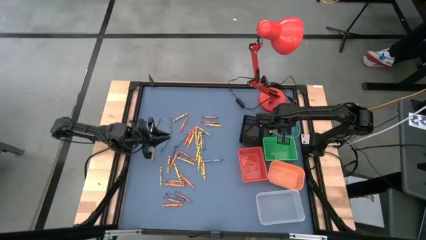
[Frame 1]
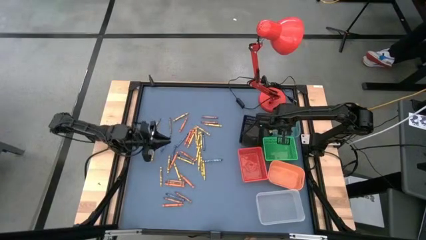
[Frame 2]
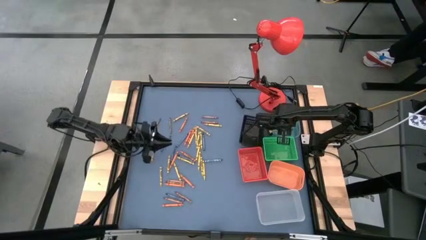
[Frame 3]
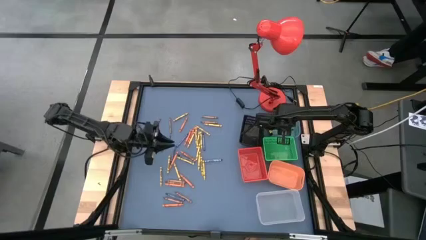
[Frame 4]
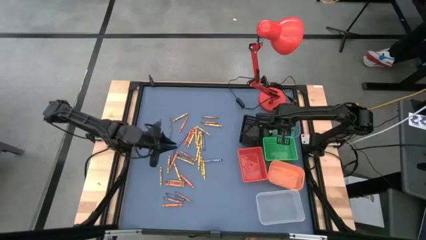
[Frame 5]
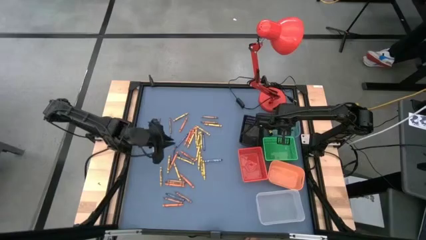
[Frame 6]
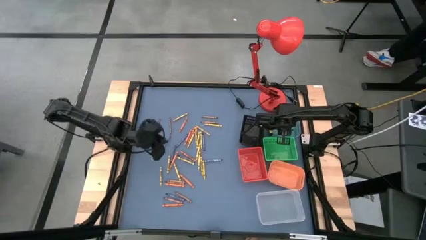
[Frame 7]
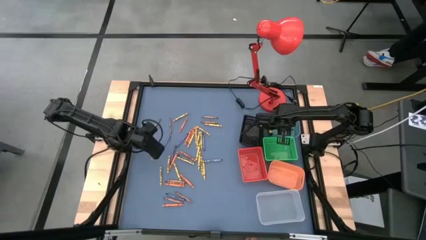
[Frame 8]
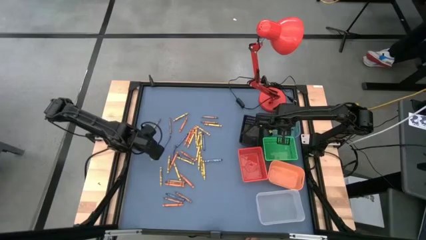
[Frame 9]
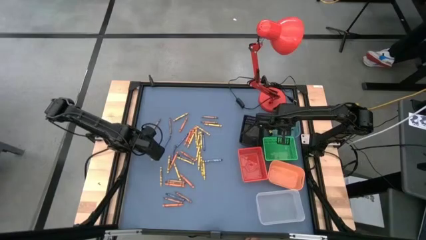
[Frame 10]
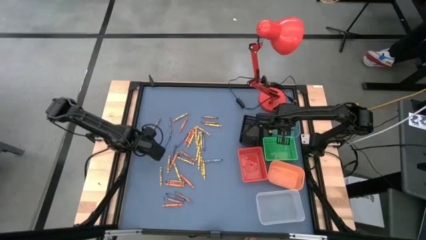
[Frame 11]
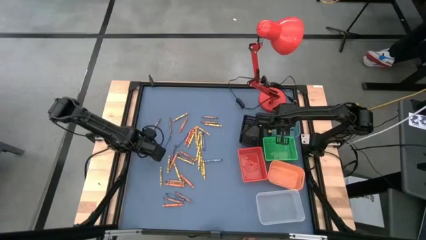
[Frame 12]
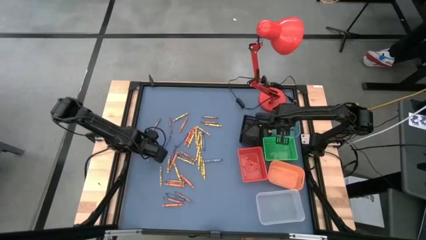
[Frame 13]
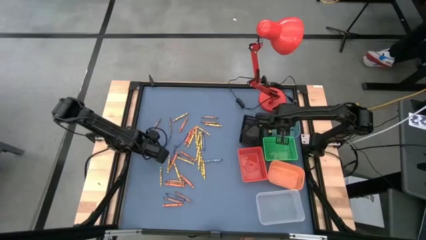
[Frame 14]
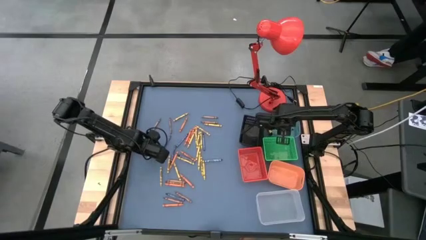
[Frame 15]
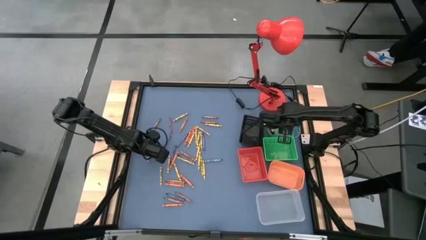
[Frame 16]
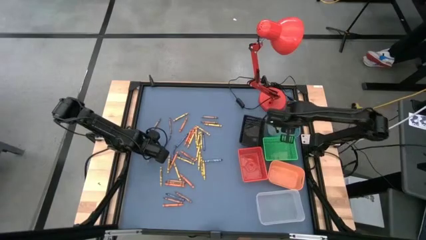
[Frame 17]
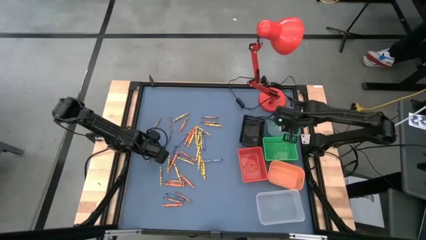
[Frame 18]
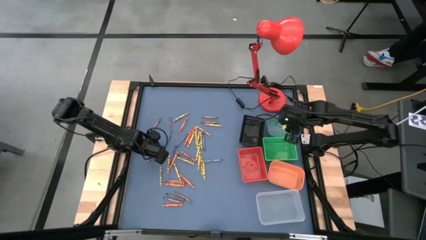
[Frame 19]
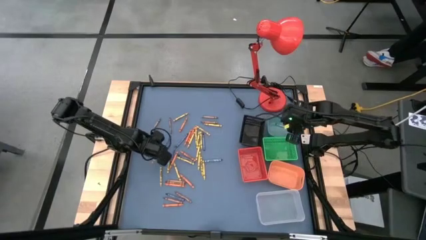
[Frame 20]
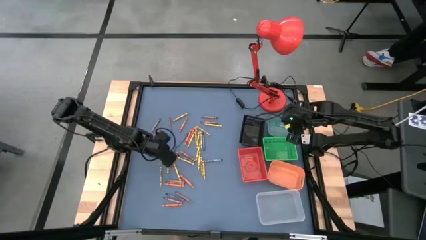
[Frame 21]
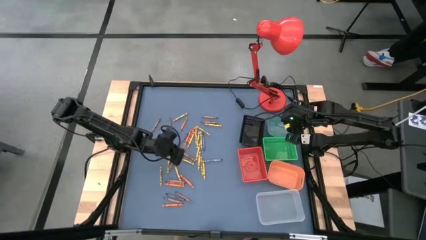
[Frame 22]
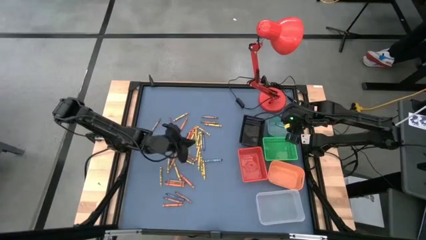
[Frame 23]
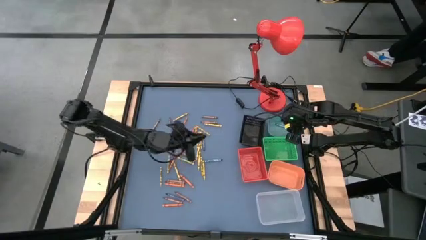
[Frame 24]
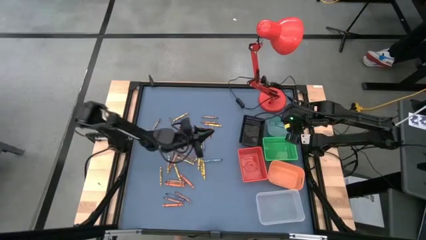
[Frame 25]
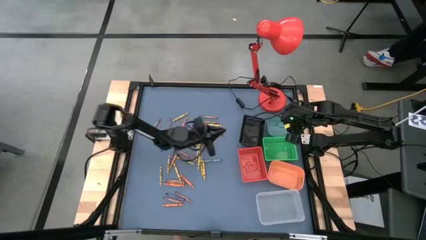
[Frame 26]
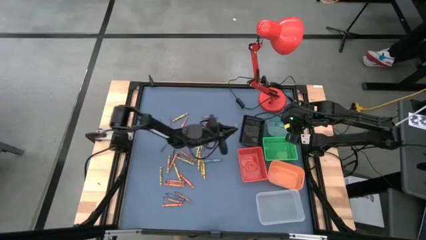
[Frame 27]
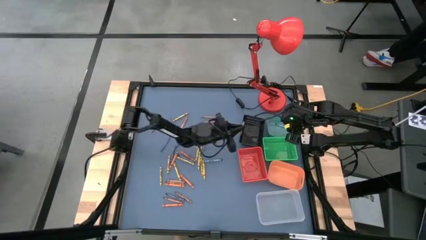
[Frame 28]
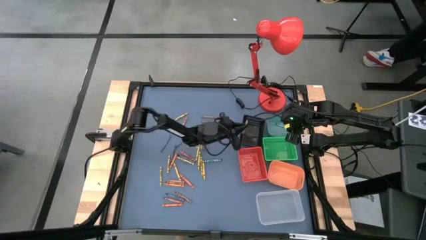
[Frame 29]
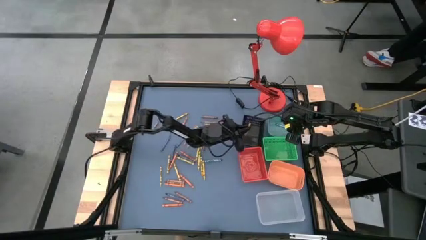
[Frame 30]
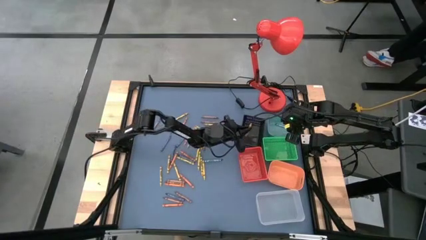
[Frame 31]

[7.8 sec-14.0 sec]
Task: Sort crayons
Put the yellow crayon into the black basket

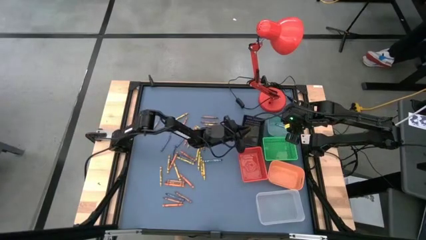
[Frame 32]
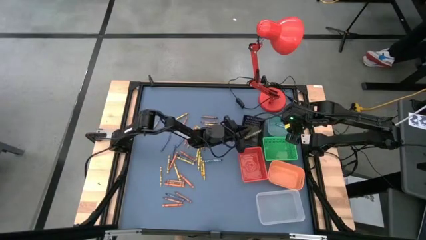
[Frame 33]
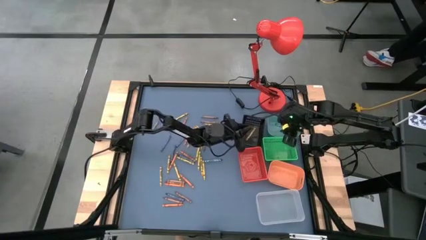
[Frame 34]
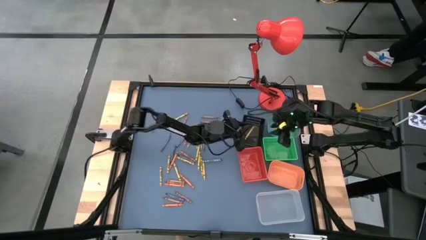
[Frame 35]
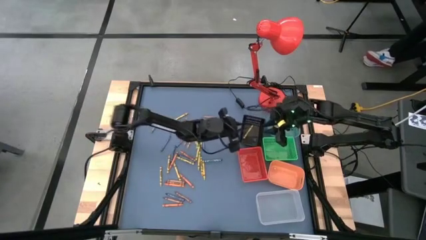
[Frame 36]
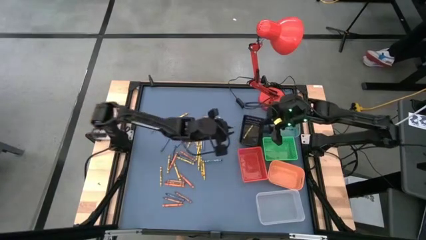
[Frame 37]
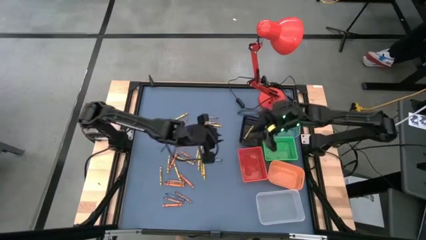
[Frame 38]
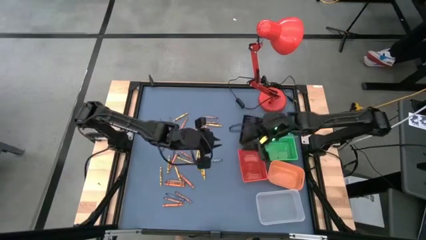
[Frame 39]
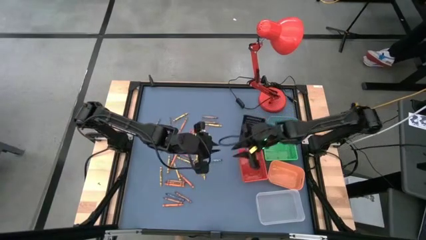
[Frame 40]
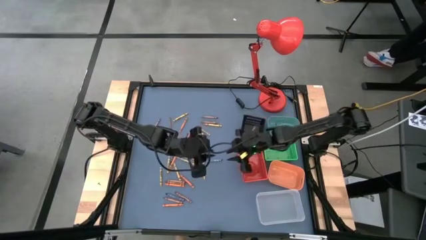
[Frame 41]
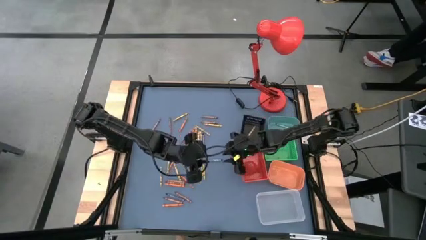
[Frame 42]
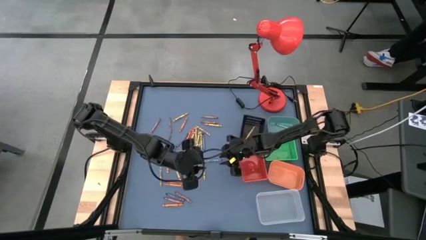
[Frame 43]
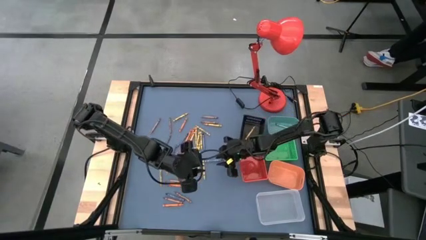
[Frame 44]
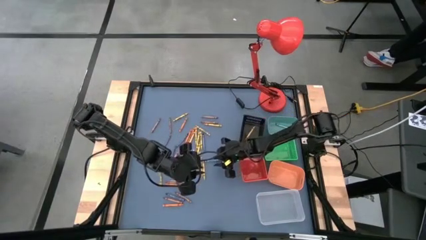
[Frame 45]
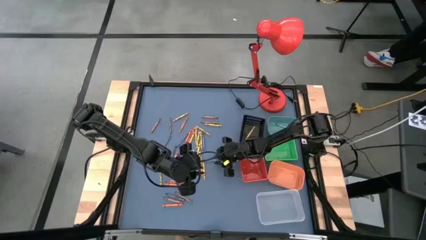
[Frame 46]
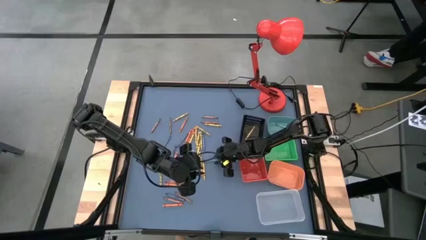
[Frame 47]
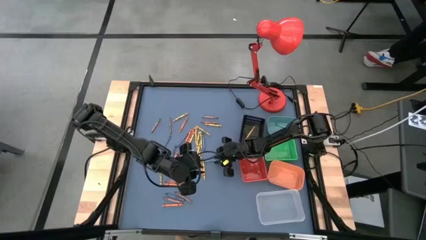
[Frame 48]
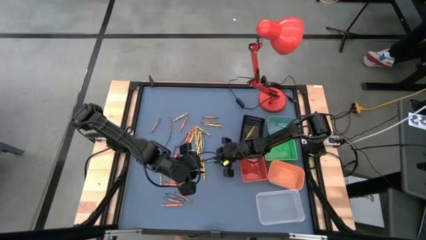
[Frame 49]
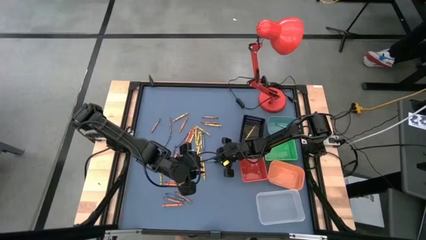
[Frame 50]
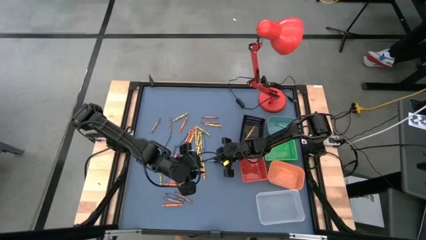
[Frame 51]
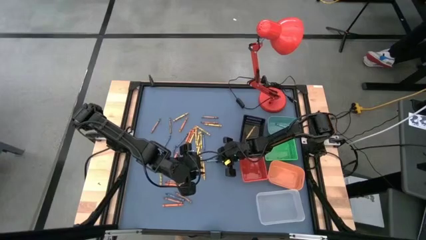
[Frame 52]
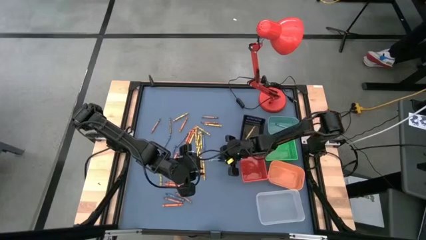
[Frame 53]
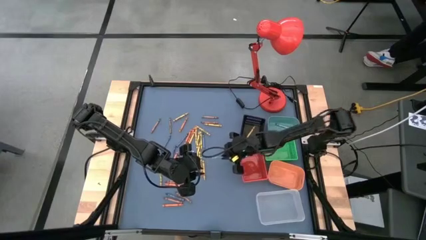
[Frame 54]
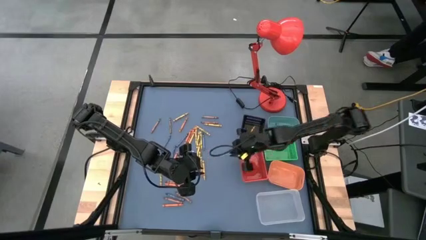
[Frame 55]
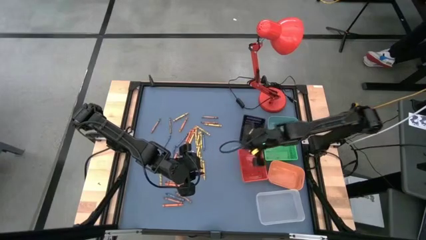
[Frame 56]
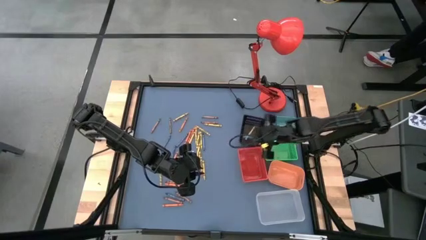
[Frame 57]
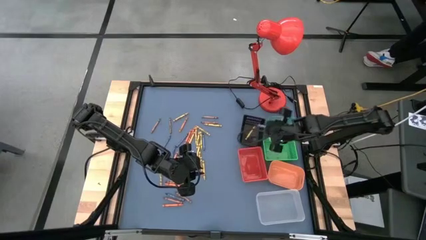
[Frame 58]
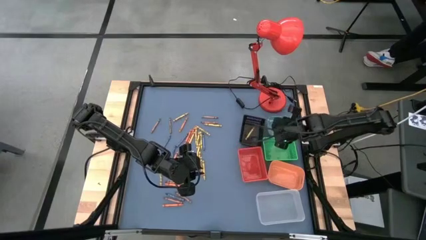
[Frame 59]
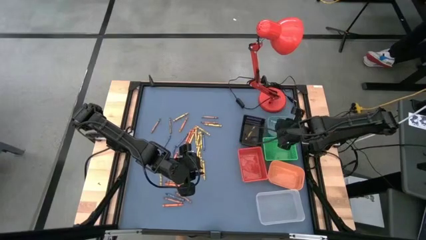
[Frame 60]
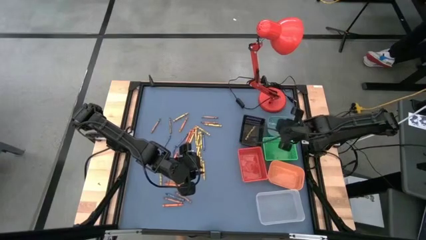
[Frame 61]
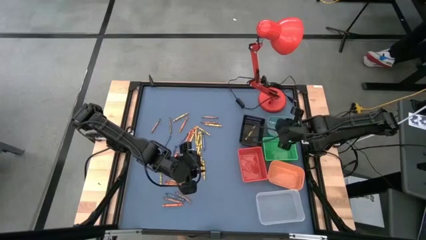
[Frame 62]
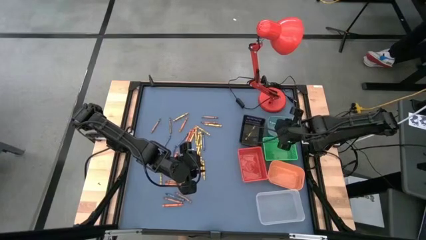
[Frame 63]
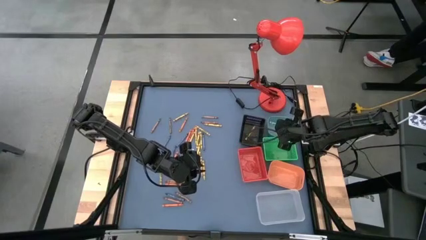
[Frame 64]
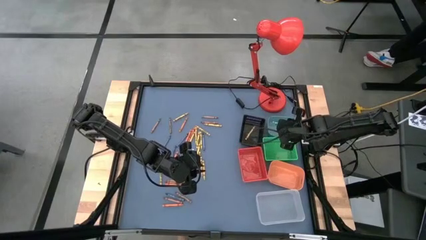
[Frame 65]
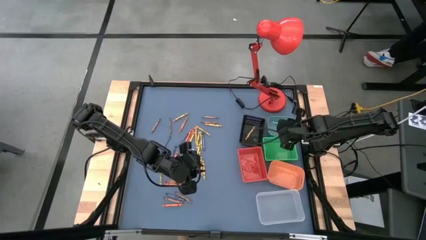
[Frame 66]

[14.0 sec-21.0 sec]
Put the dark blue crayon into the blue bin

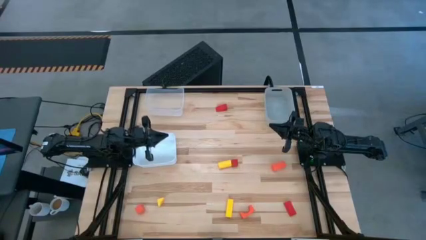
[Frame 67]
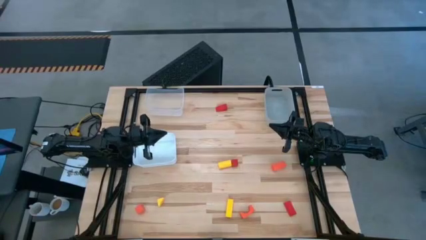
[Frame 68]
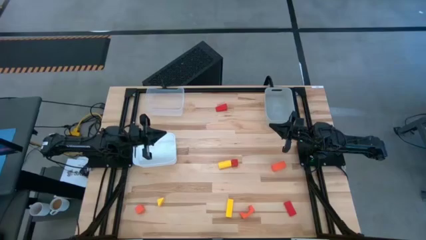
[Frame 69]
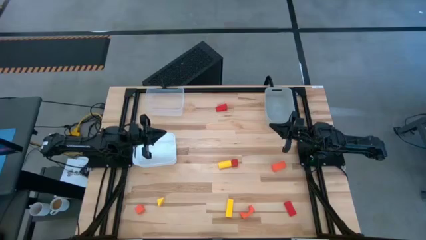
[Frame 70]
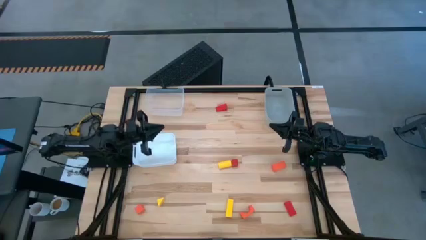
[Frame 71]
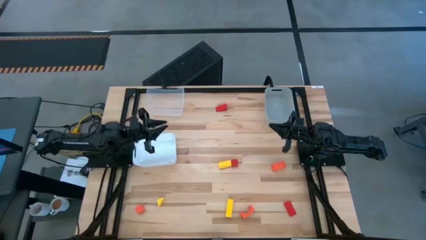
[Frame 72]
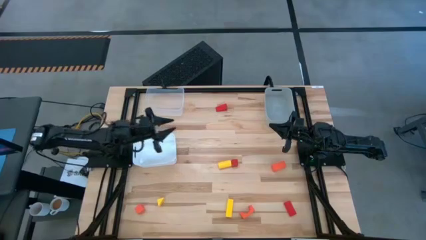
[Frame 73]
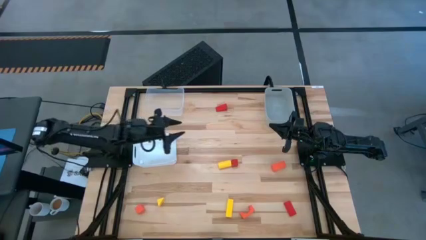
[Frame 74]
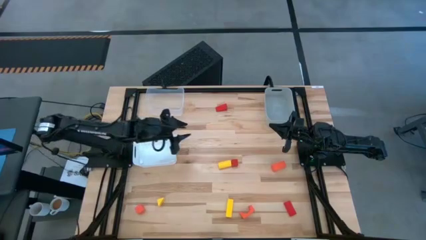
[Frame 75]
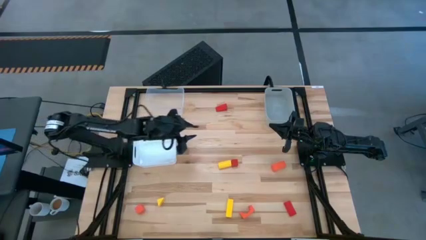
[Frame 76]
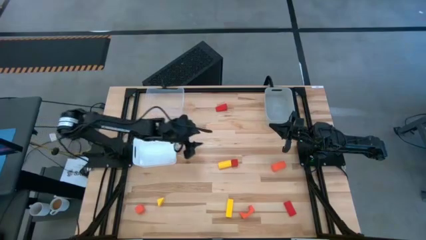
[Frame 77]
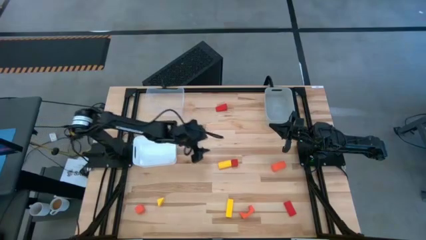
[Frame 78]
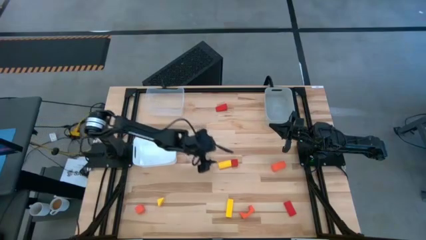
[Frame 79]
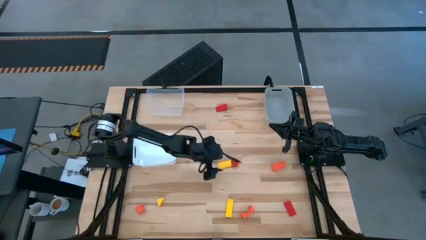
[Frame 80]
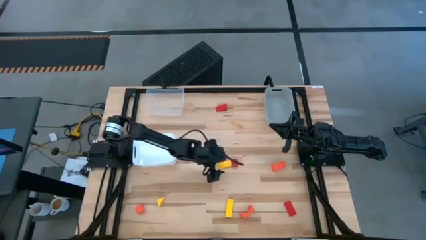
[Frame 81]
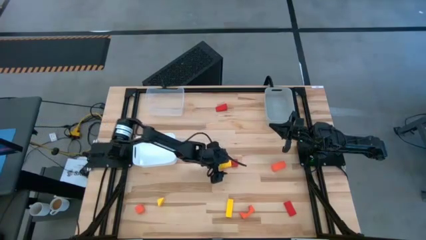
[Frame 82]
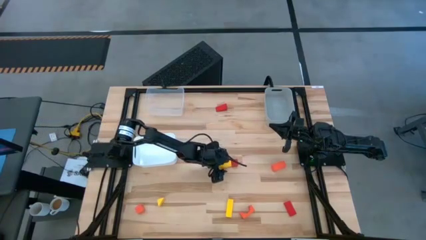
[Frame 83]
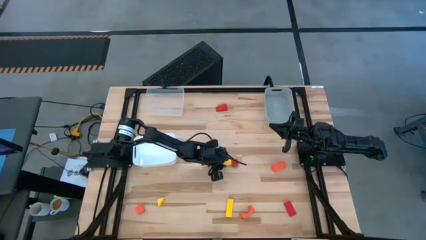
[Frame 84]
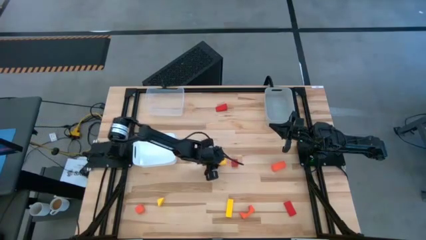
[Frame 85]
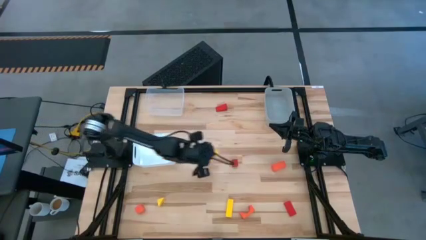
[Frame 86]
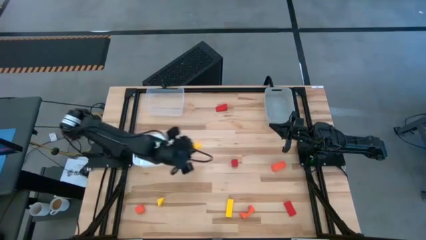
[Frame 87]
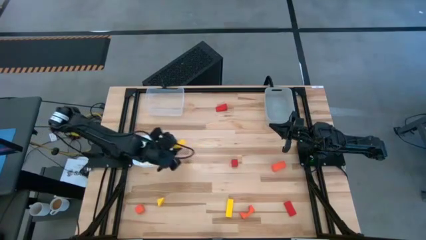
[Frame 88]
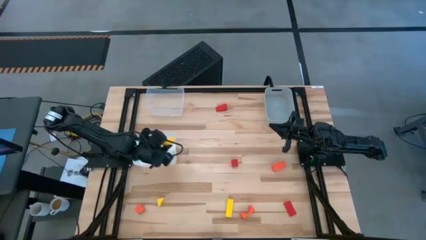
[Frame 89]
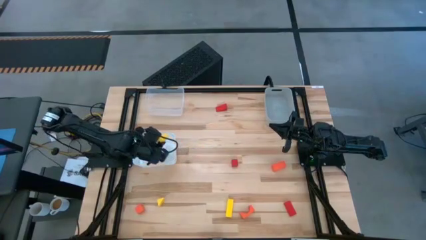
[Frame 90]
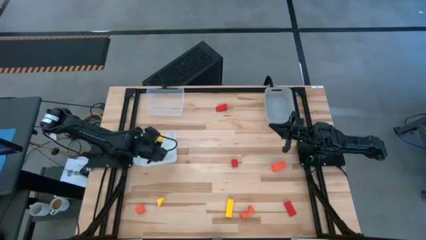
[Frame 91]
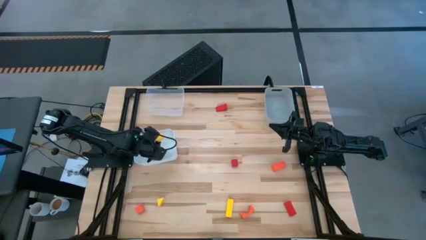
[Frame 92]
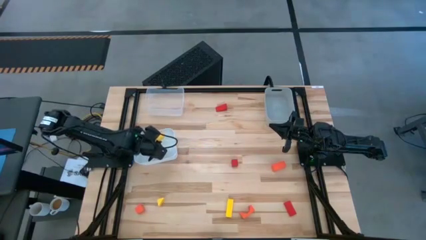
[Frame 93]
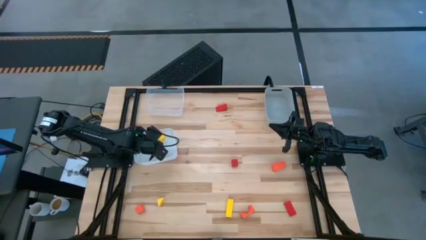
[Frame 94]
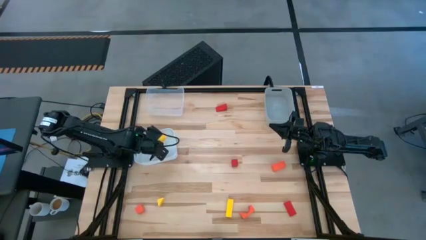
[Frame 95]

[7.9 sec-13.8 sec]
Task: Sort & place blocks by color
Put the top yellow block into the white bin
